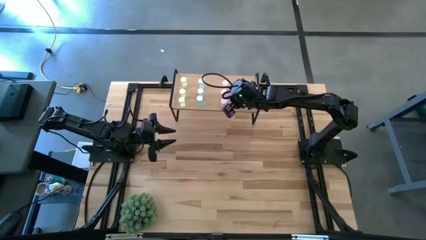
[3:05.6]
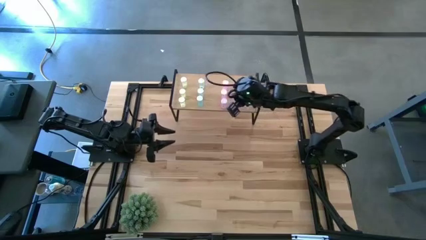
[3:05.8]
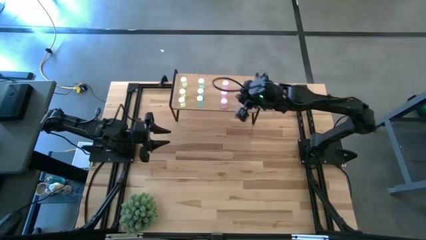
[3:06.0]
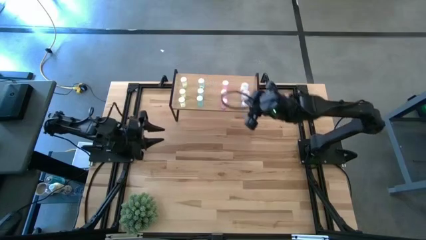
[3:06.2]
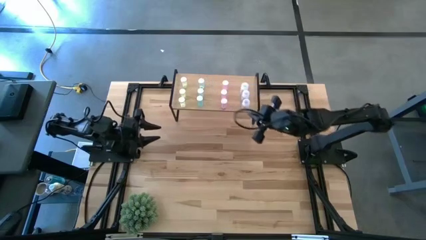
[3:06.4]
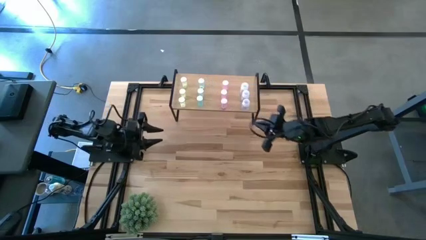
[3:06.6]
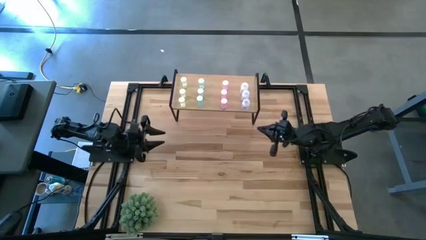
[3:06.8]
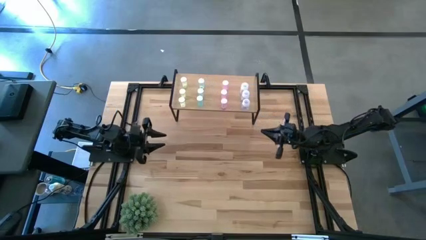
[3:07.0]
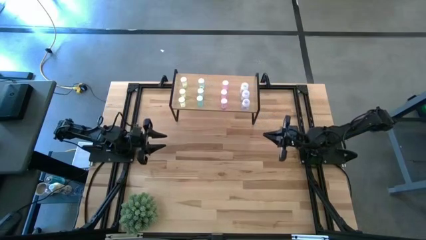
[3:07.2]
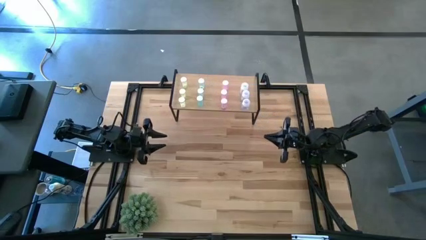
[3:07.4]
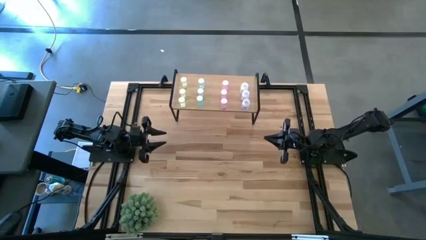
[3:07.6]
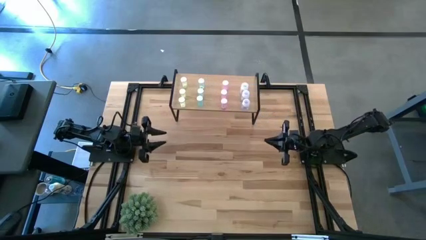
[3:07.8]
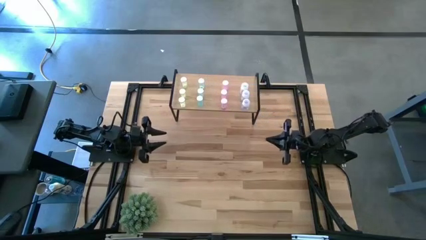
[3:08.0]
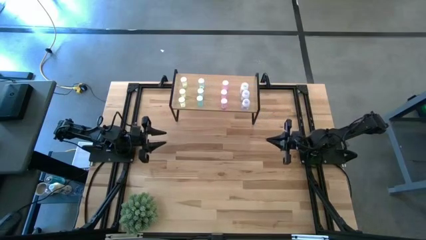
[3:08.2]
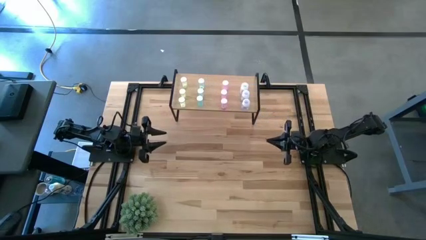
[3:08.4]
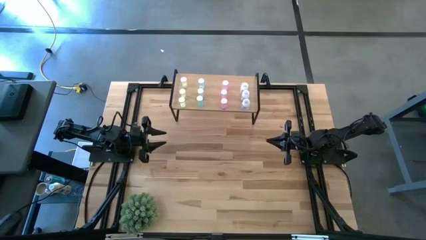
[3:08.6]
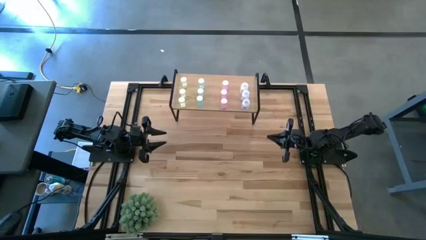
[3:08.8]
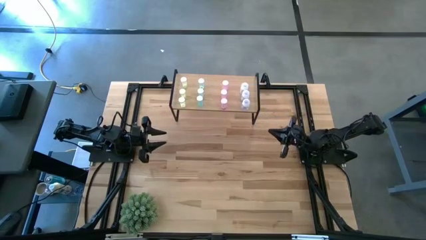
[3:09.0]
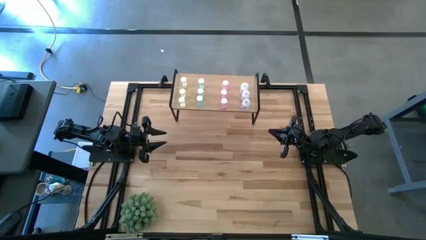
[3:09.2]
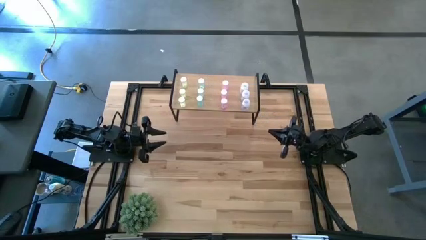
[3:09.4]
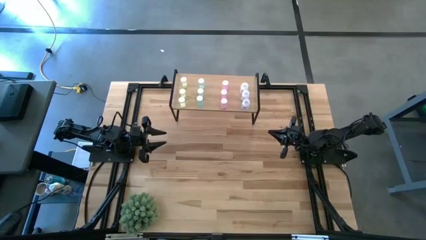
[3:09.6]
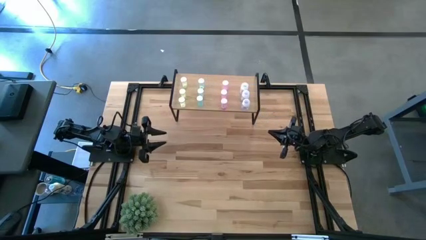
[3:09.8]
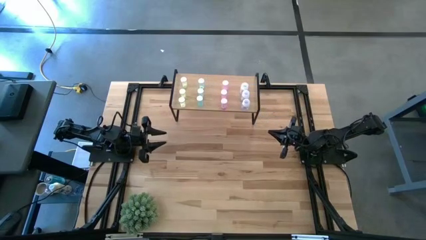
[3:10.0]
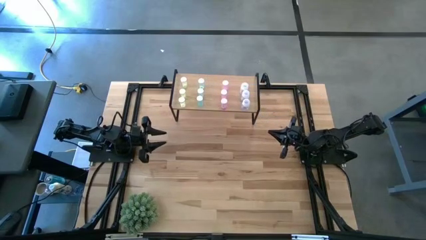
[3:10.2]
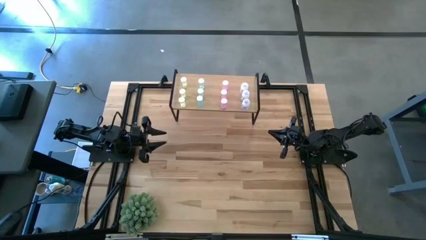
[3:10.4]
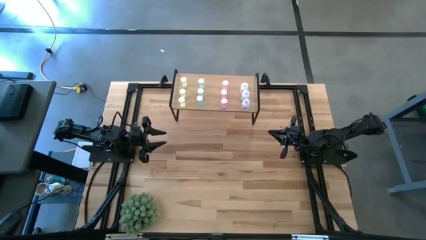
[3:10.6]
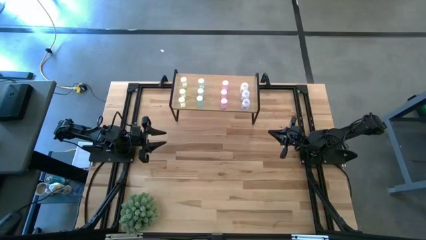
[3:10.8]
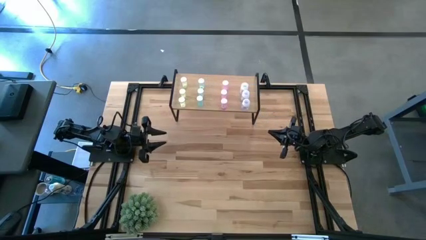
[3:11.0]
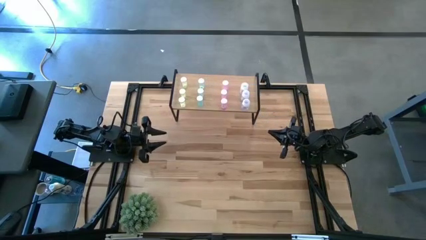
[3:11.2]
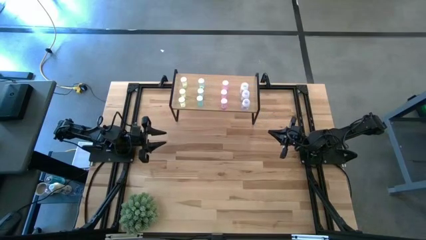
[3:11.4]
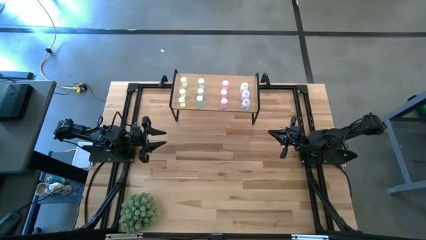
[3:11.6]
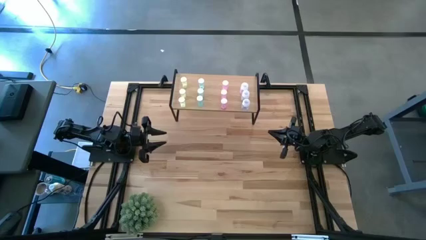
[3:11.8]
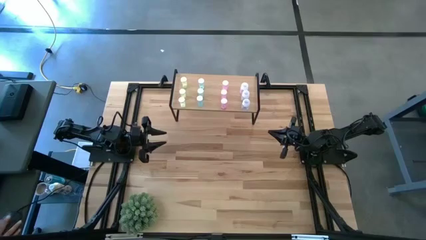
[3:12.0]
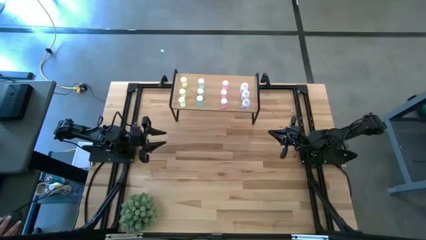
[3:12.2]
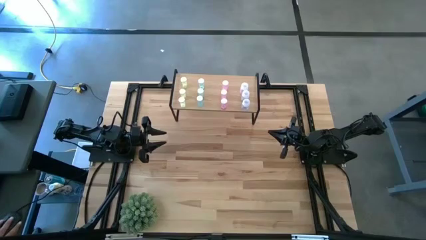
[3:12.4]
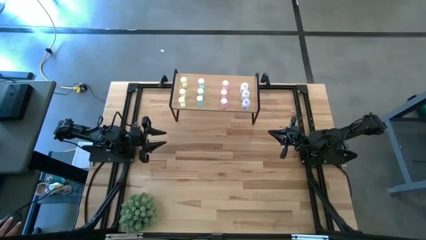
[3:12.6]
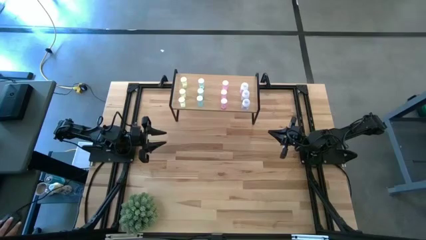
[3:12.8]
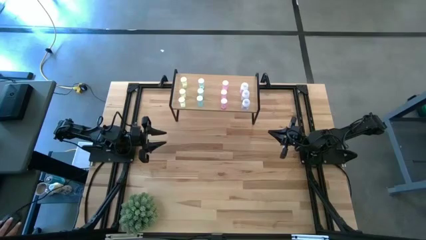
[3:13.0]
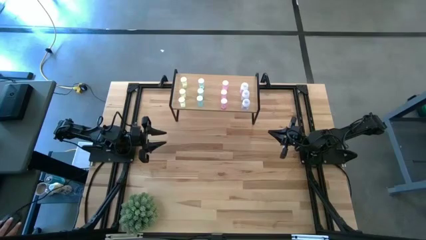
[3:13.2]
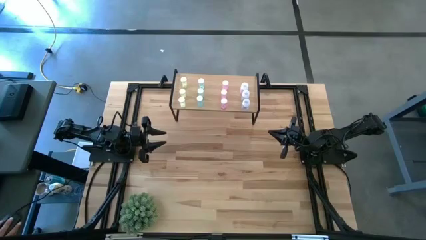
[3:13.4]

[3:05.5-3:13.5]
Task: Pick and place medicine bottles onto shelf by color
Return to Home Position

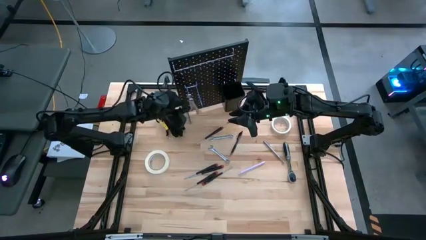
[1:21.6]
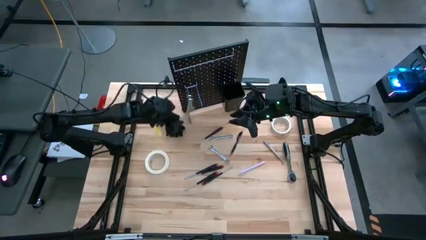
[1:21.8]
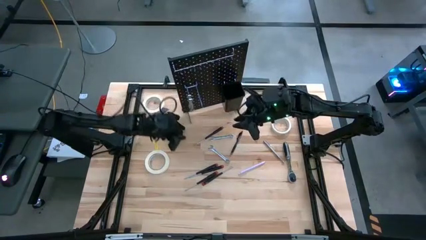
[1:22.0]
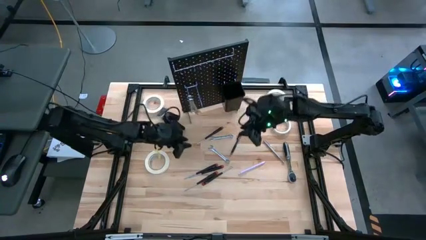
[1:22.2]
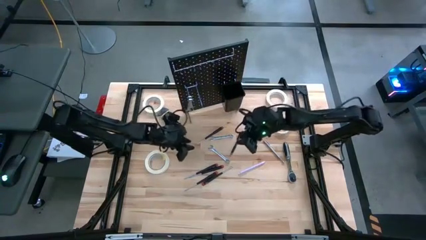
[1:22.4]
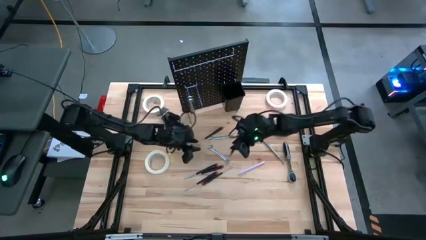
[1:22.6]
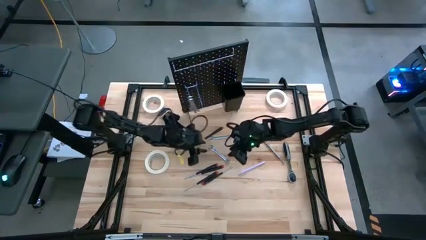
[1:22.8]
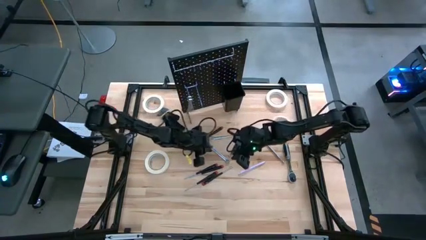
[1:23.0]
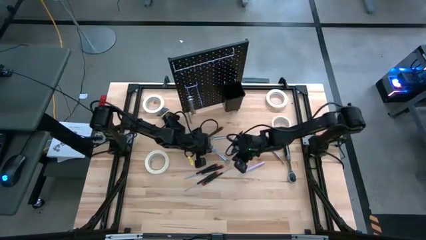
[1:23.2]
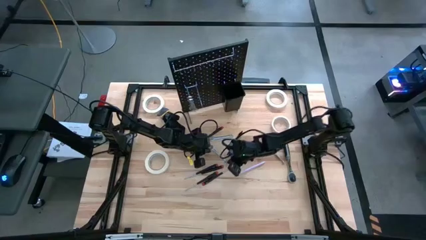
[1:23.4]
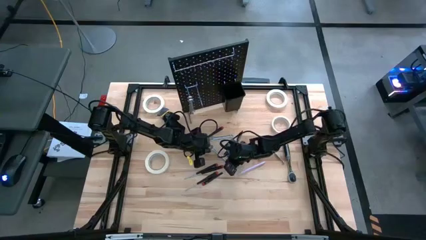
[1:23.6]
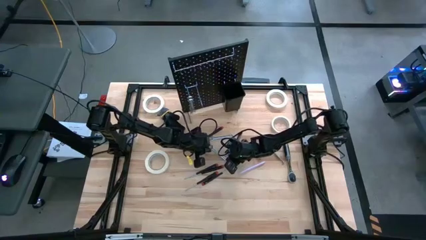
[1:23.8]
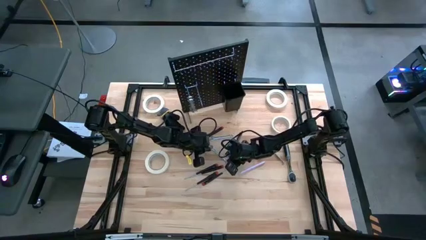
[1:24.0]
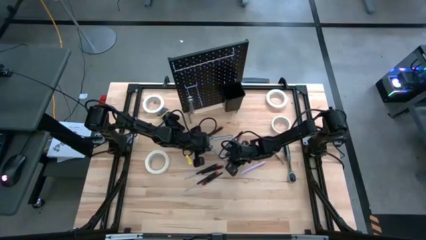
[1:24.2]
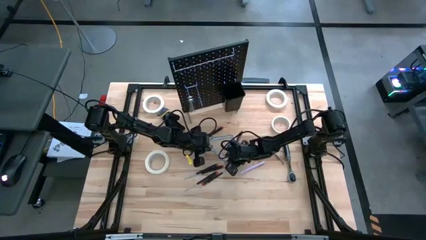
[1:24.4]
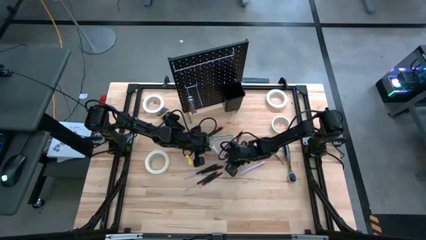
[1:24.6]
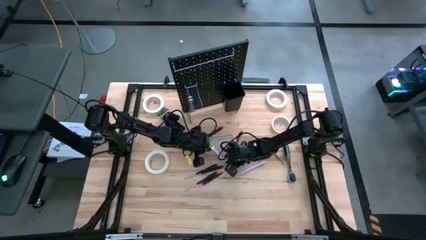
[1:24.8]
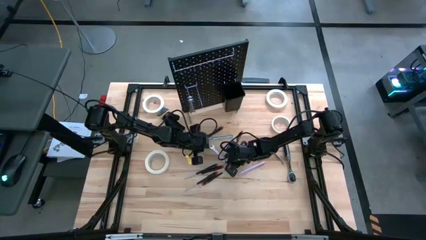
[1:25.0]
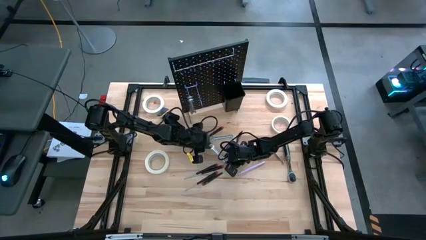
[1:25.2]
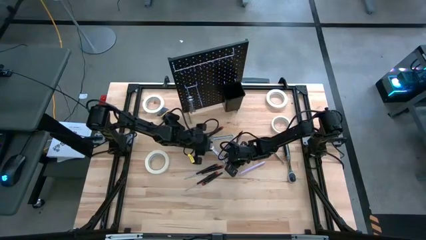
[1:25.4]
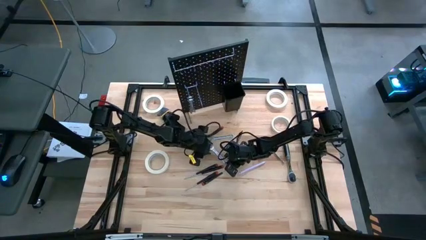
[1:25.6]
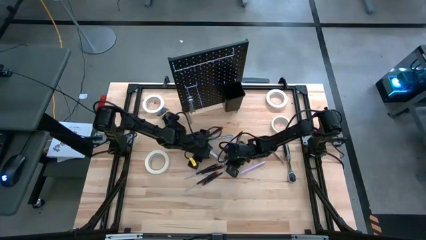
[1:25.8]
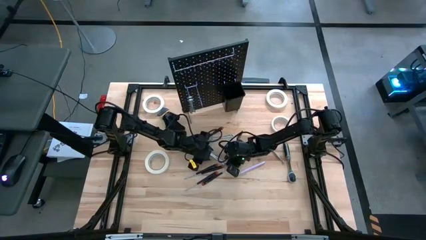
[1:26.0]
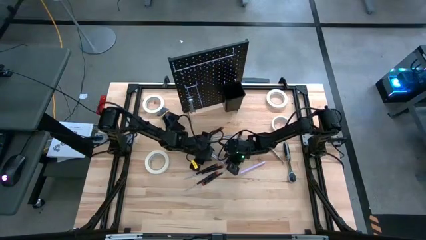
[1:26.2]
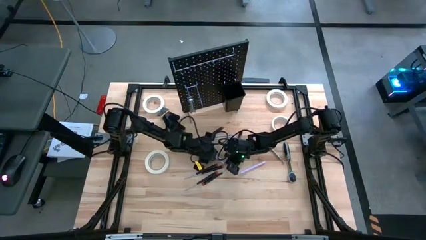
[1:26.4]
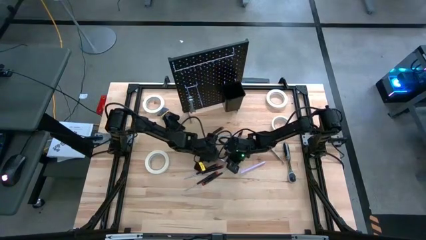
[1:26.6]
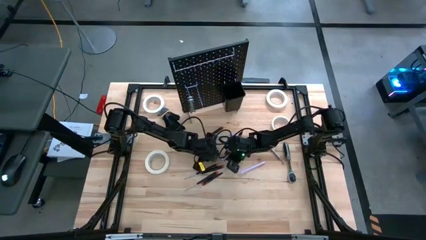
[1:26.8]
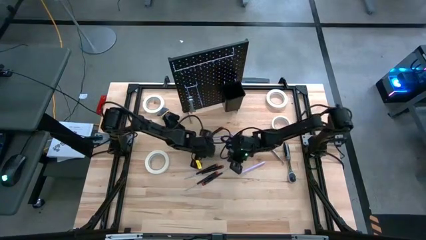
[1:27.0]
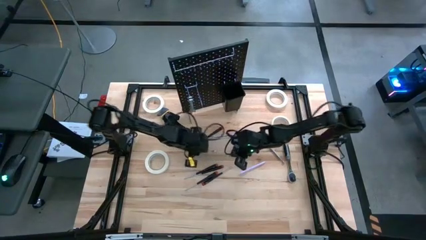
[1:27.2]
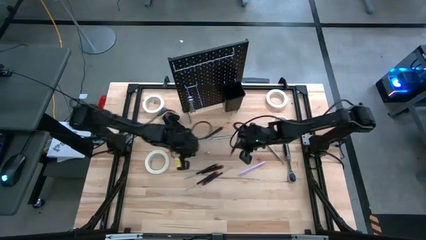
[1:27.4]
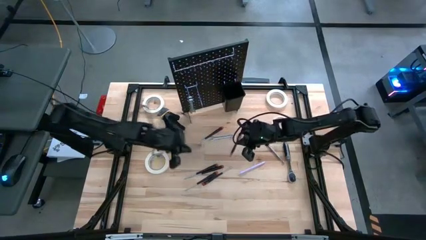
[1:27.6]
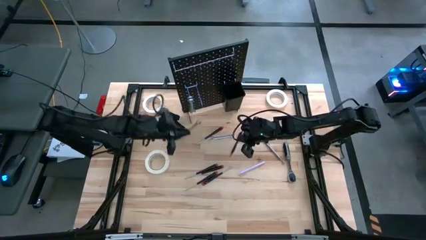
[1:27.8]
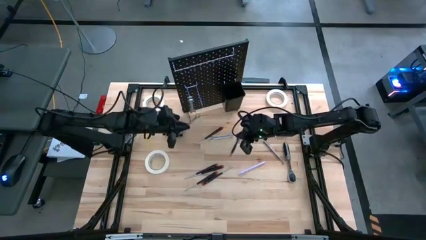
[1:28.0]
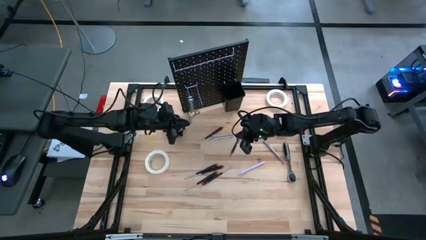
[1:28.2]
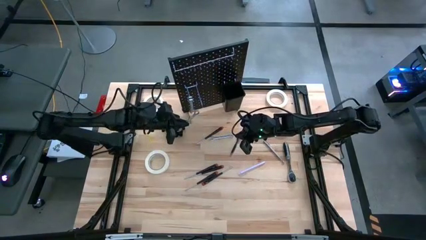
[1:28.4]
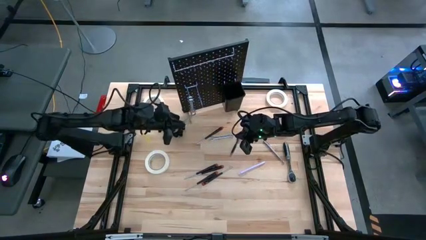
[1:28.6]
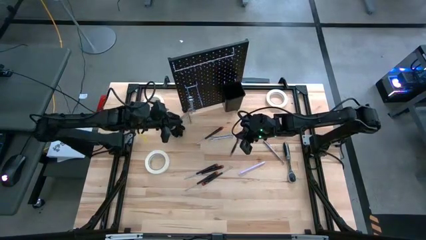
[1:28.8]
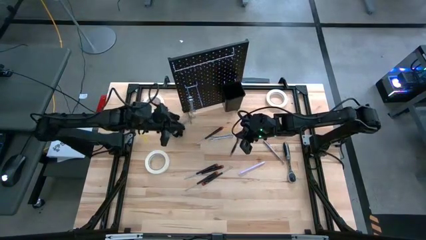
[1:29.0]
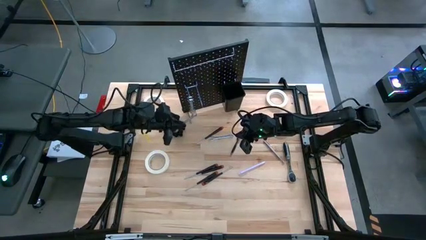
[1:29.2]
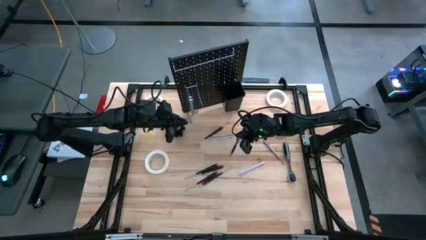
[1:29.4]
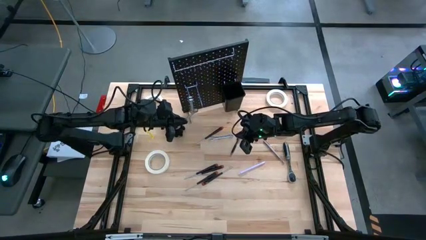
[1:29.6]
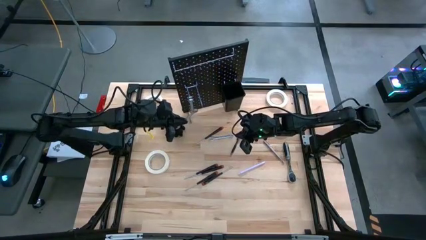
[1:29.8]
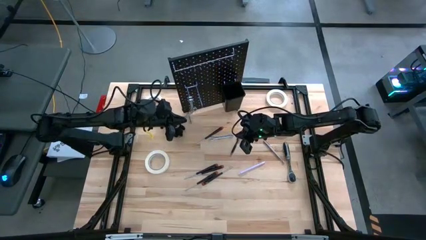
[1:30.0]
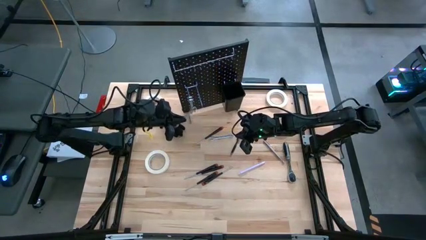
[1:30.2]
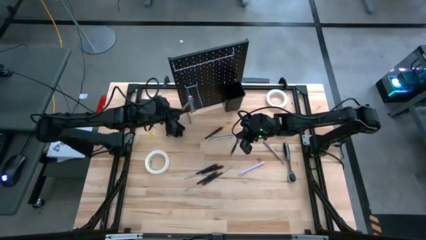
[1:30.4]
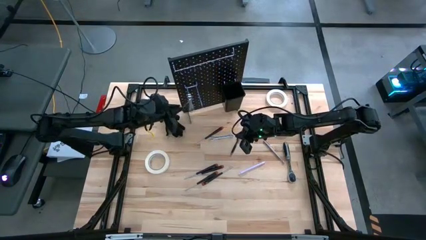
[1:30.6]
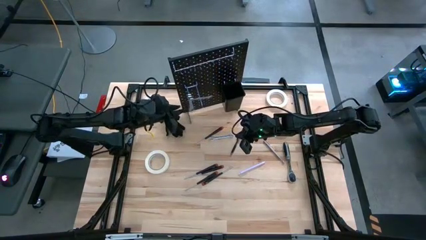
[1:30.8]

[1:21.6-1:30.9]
Task: Hang tools onto peg board
Hang the silver wrench on the peg board
